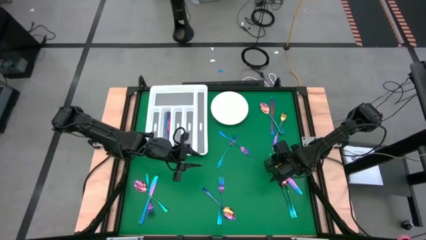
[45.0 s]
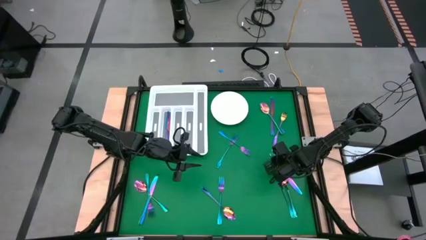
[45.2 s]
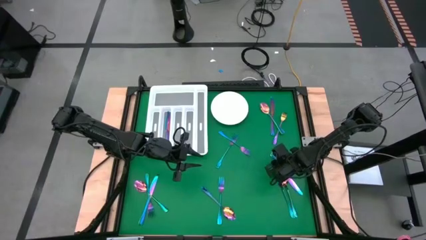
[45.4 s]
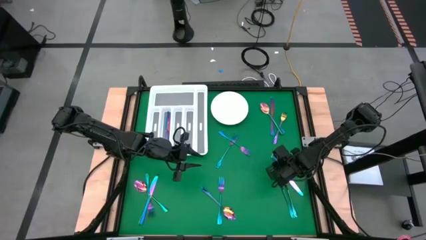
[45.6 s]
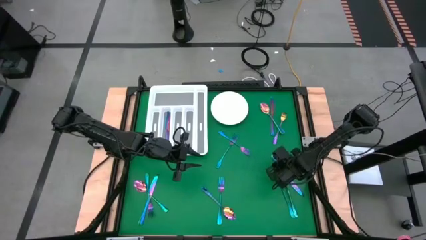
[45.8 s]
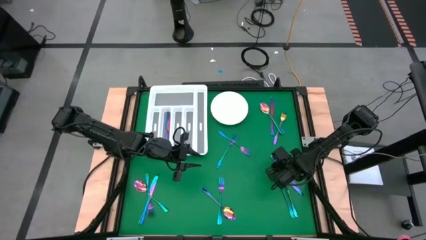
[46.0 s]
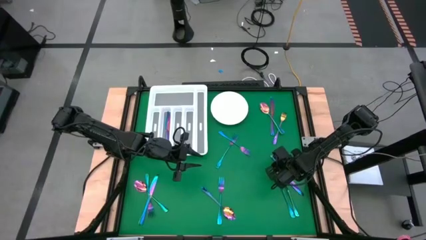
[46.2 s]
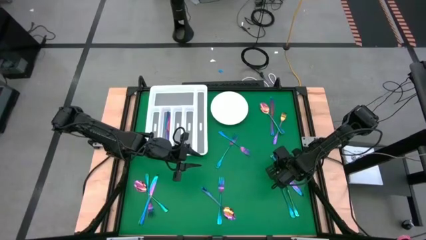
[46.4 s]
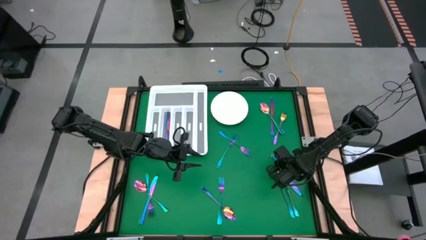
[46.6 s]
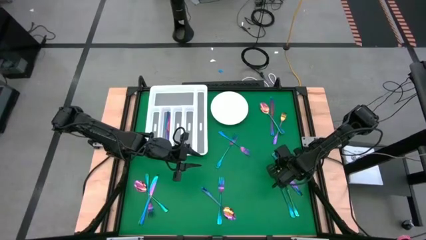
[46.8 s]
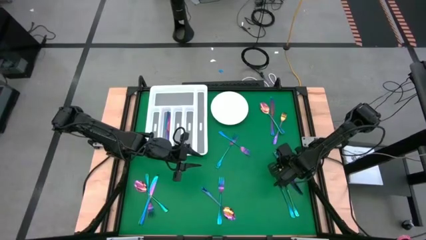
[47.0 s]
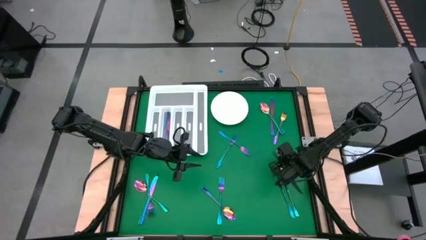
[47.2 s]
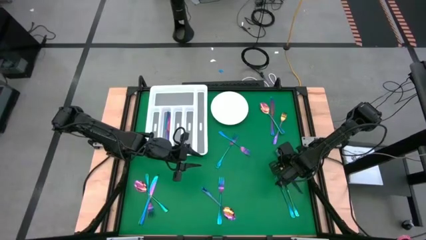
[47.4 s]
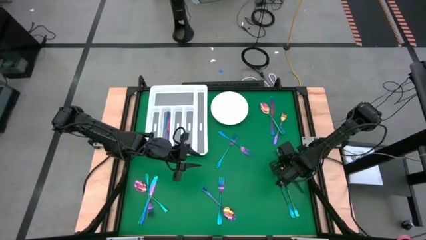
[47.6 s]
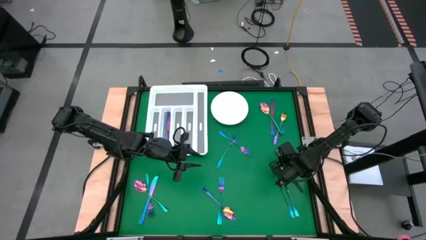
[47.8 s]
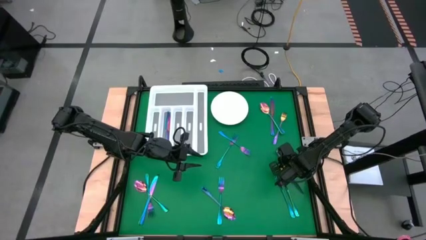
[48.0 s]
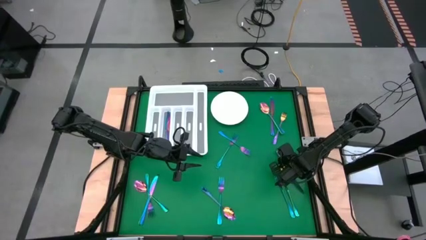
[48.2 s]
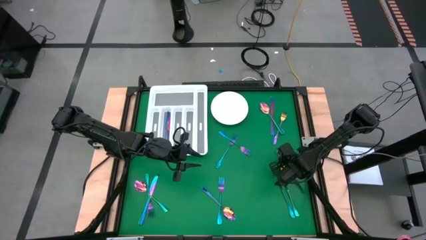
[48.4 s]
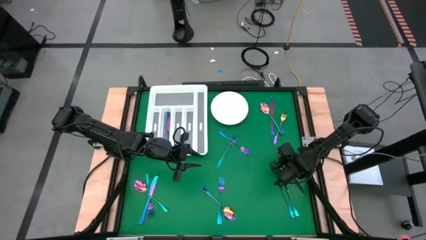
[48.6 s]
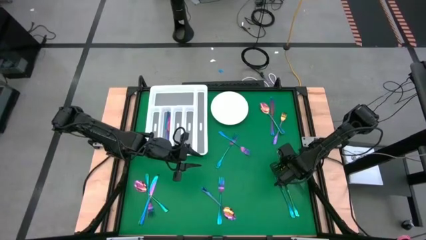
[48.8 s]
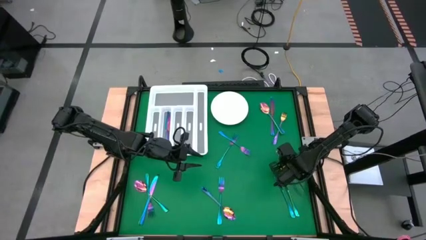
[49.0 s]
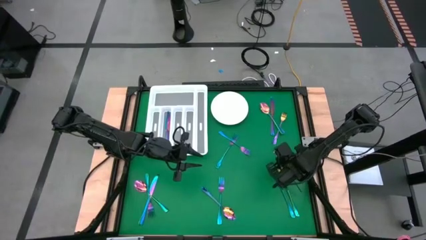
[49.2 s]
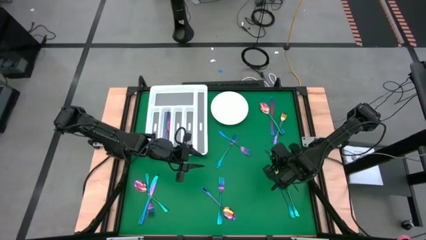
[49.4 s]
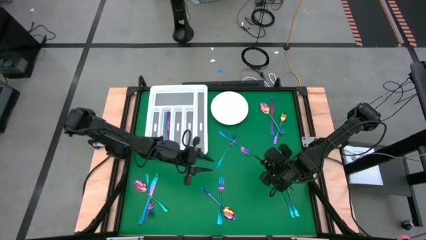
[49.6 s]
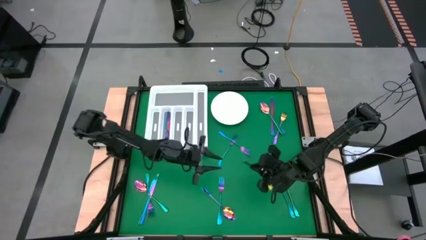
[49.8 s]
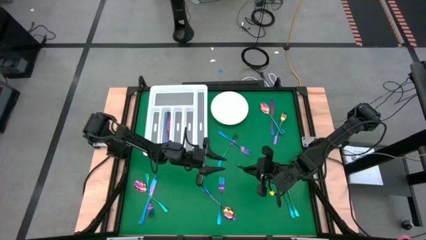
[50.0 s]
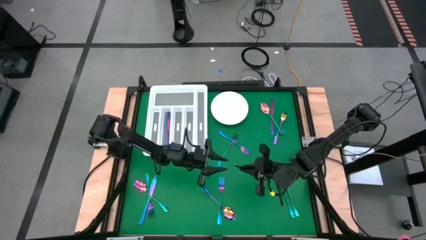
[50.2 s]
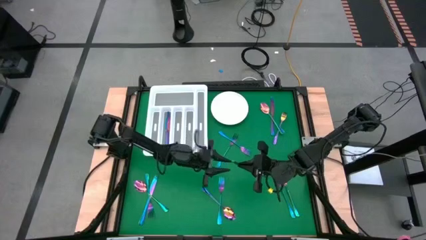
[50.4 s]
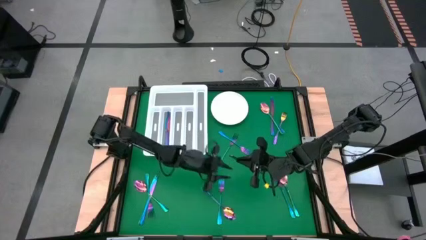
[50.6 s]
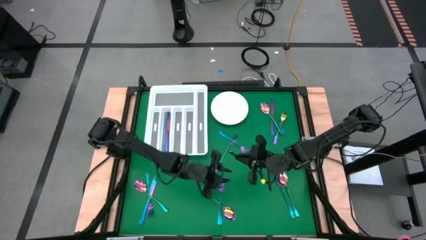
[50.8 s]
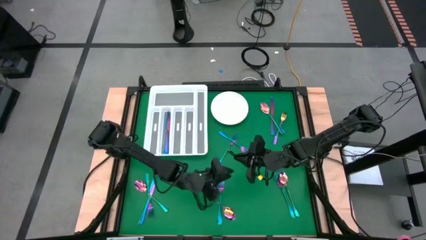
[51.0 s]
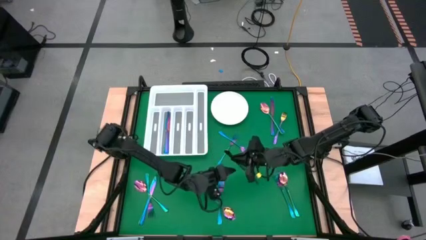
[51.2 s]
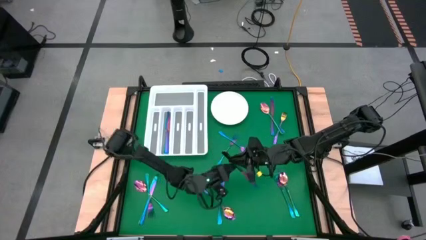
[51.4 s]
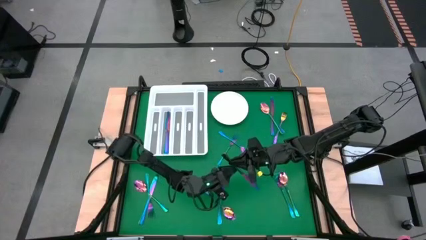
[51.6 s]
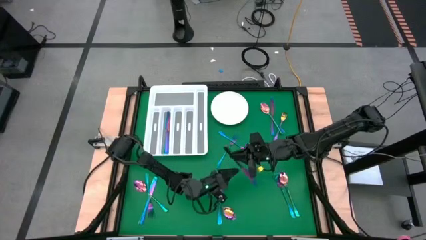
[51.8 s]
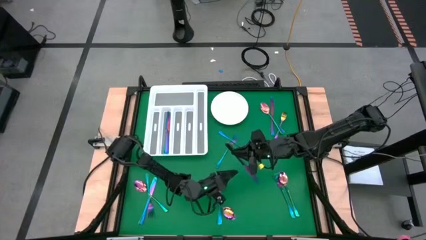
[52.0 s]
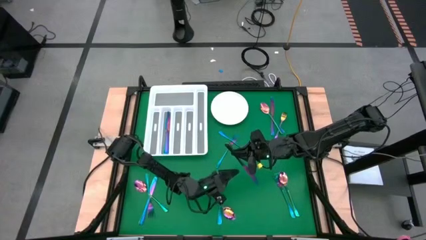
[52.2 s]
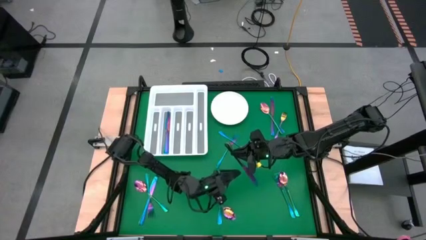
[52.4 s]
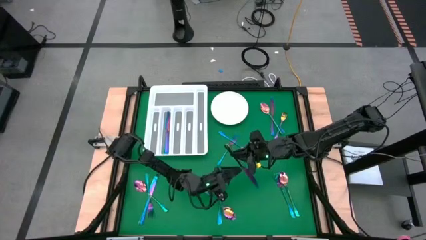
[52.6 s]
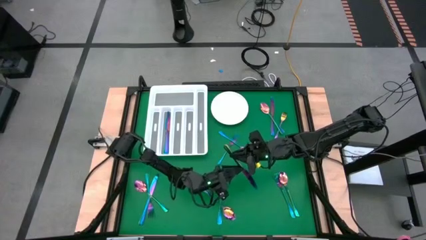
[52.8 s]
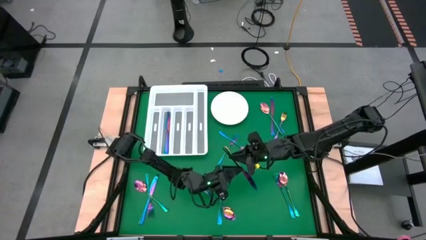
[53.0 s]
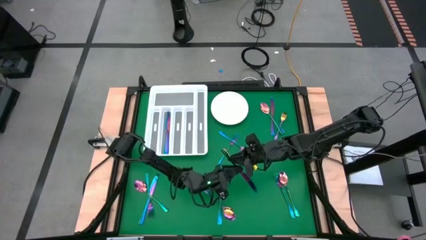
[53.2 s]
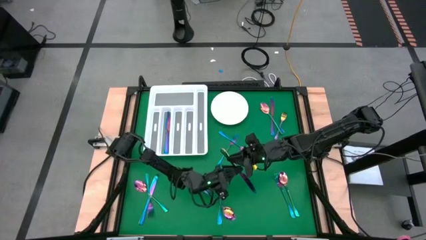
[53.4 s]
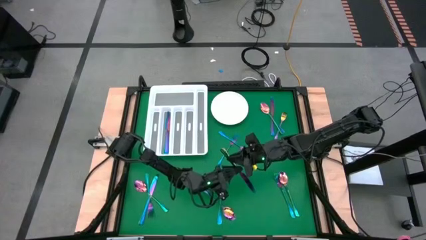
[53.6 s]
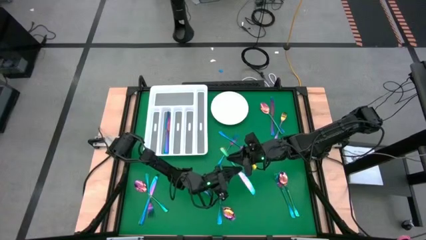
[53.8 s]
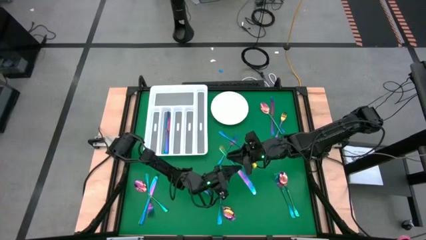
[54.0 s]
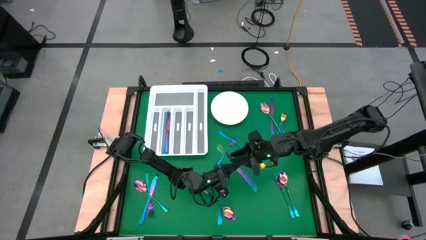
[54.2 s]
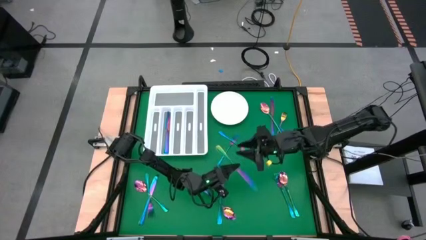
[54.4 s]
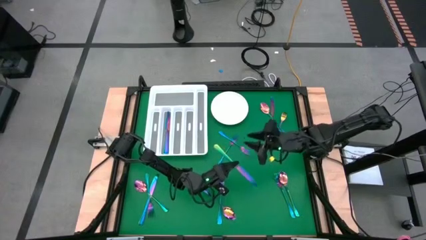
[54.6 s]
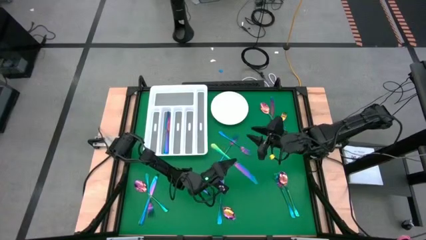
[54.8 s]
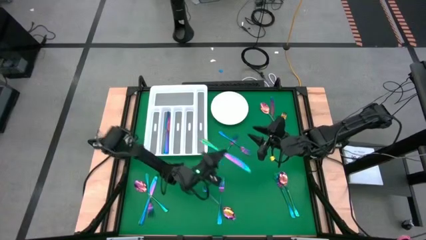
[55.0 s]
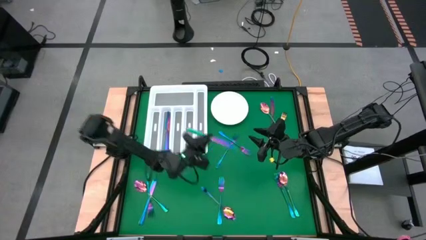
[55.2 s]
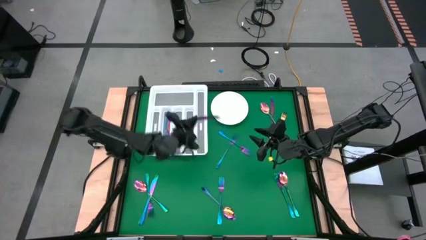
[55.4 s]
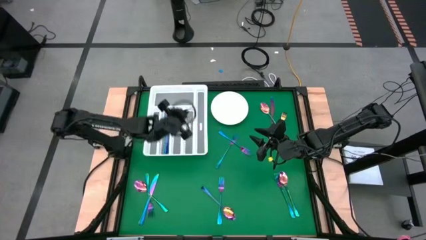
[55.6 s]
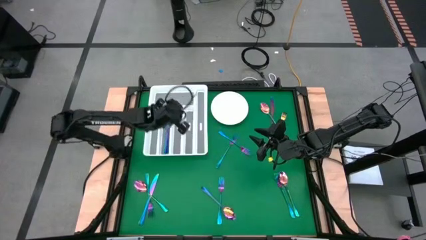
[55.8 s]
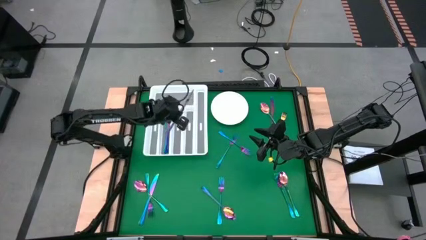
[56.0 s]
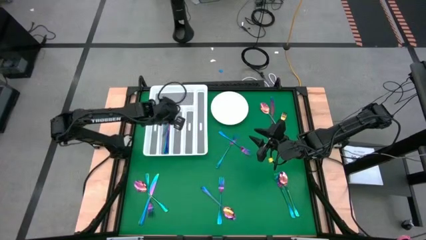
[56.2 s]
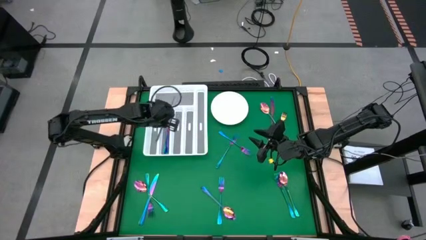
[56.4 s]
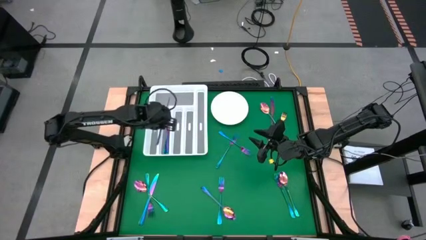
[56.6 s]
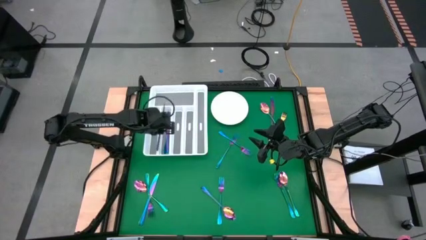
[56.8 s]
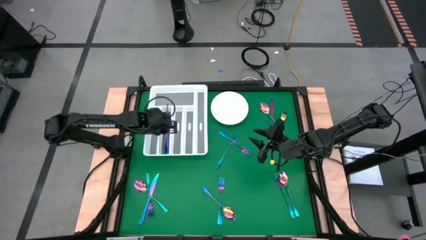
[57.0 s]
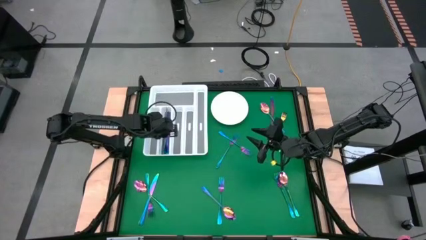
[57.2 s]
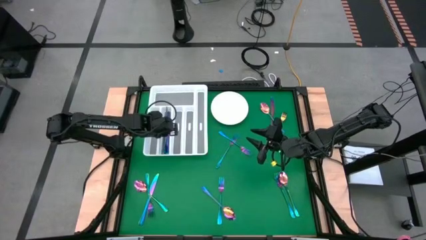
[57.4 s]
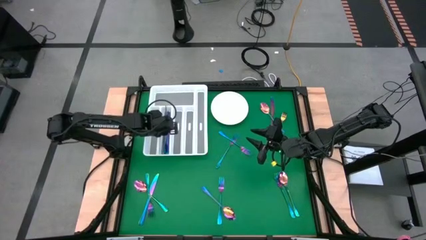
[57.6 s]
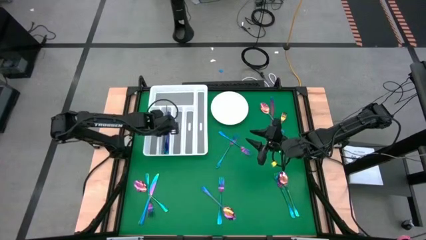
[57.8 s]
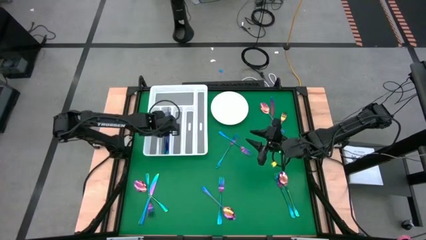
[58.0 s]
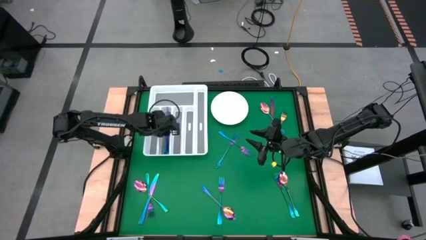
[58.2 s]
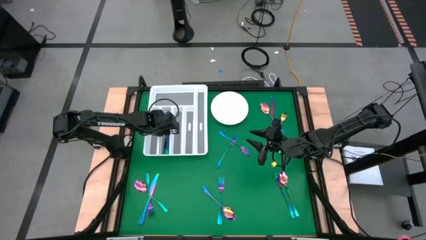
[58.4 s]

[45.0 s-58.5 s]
Task: Sort silverware
Put the blue knife into the silverware tray
